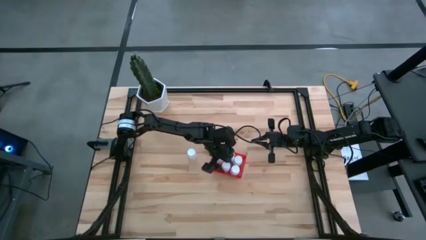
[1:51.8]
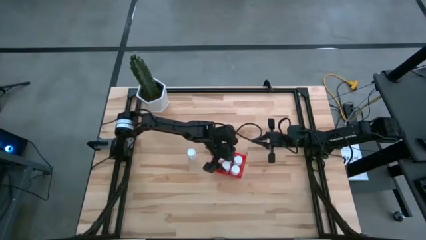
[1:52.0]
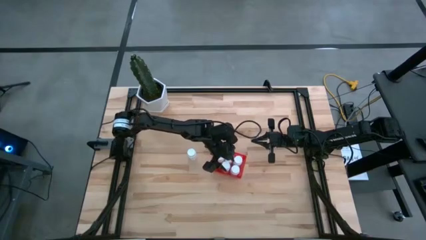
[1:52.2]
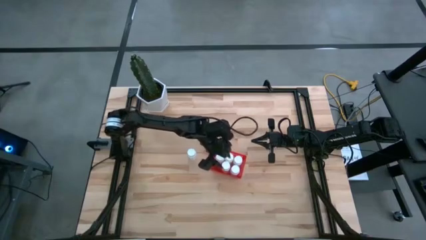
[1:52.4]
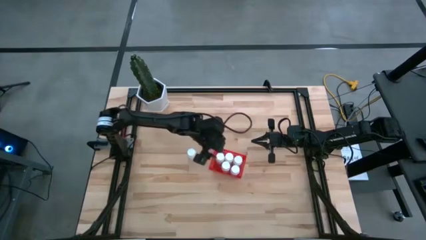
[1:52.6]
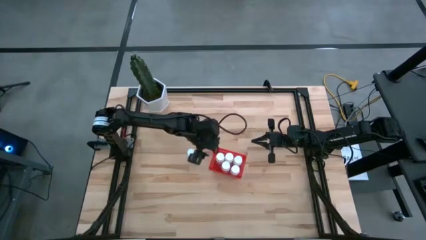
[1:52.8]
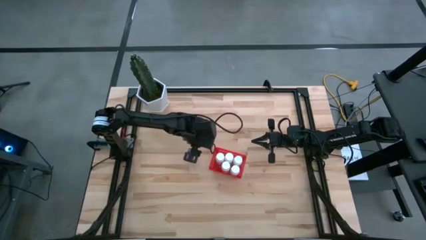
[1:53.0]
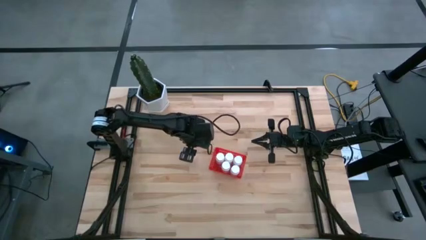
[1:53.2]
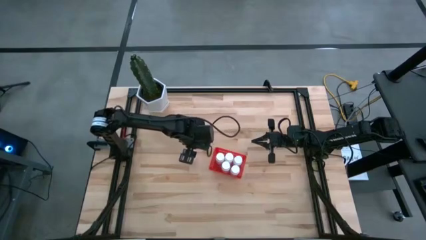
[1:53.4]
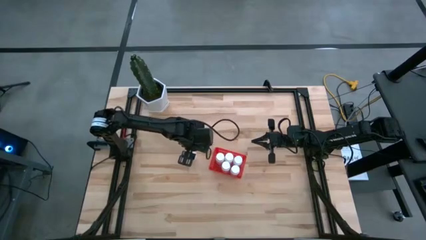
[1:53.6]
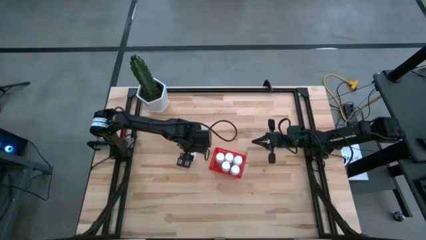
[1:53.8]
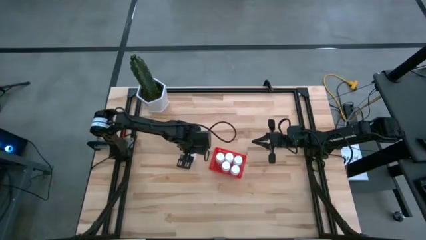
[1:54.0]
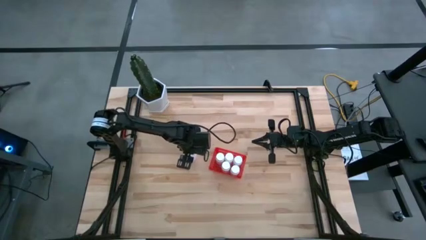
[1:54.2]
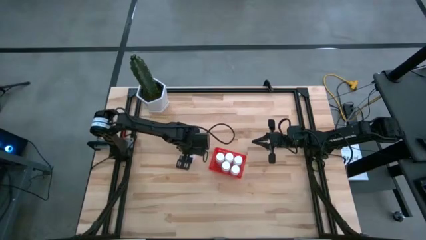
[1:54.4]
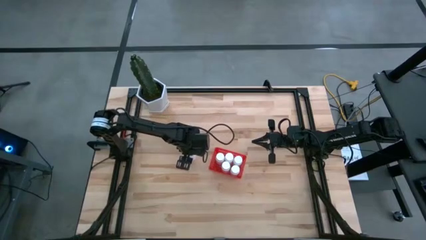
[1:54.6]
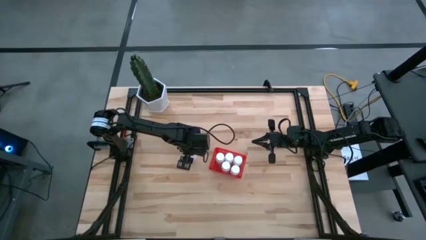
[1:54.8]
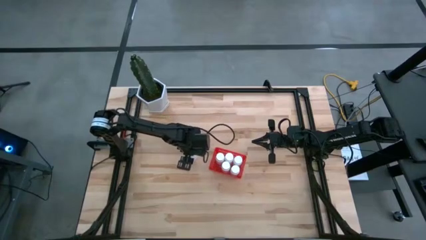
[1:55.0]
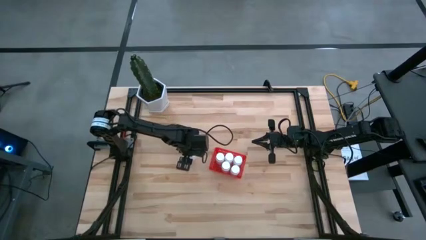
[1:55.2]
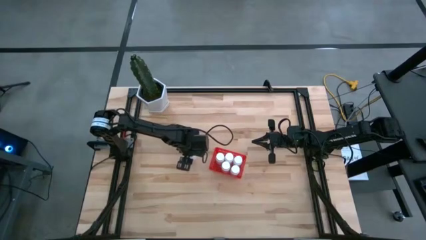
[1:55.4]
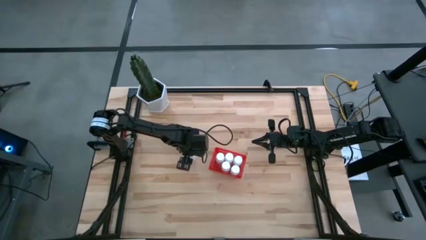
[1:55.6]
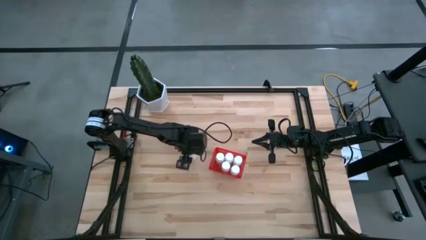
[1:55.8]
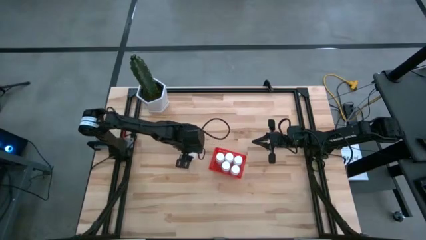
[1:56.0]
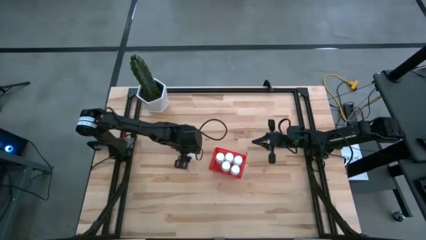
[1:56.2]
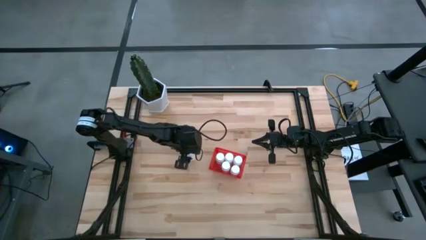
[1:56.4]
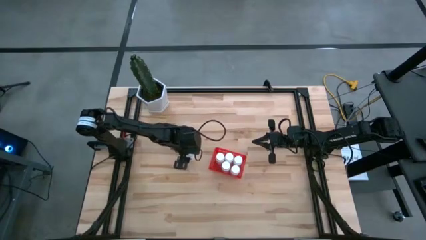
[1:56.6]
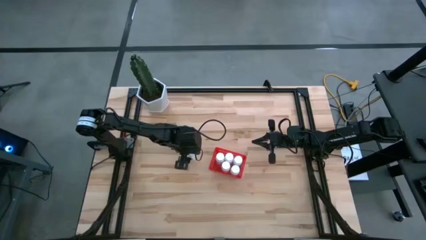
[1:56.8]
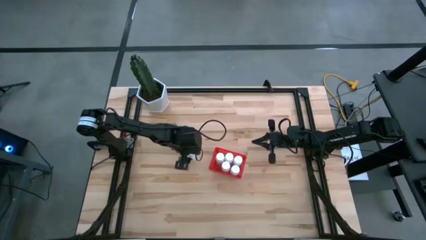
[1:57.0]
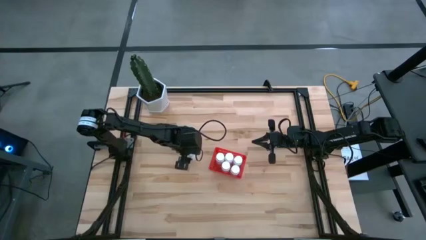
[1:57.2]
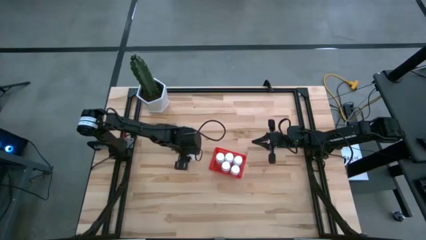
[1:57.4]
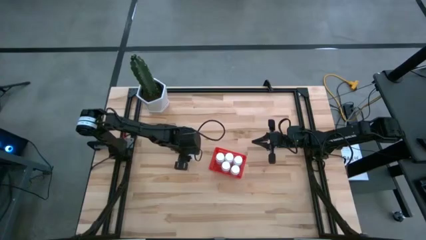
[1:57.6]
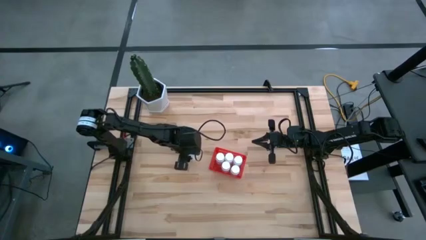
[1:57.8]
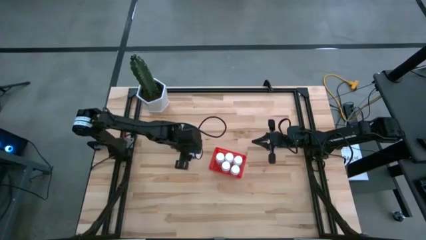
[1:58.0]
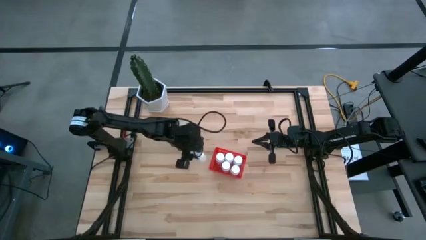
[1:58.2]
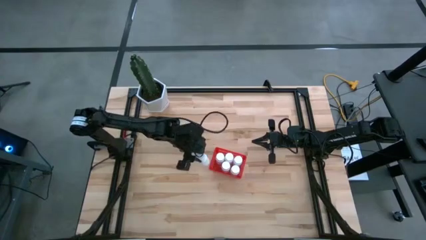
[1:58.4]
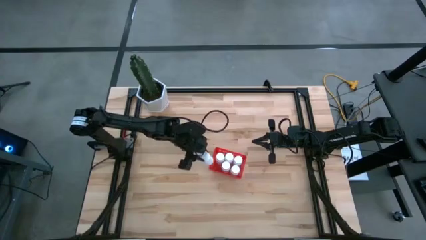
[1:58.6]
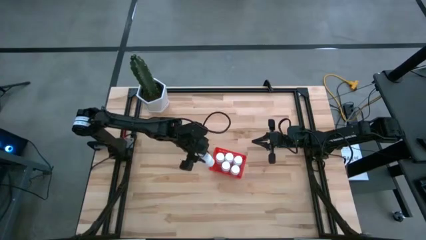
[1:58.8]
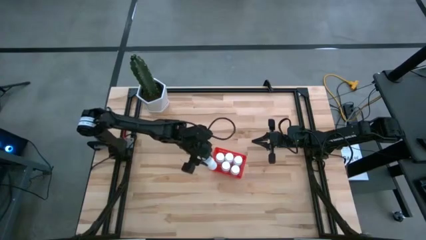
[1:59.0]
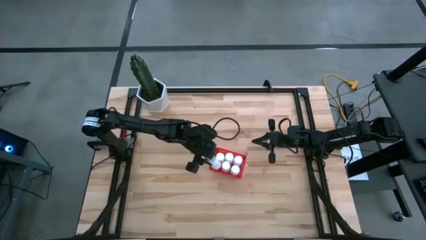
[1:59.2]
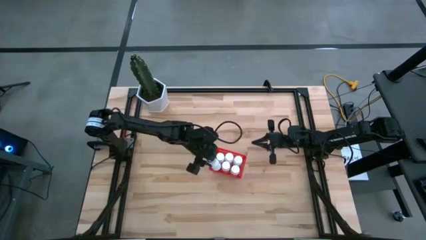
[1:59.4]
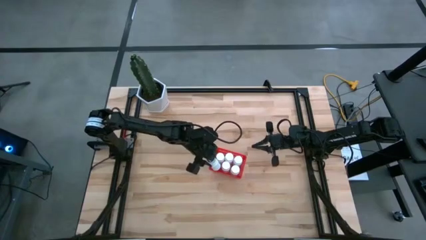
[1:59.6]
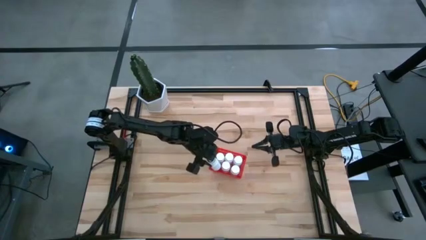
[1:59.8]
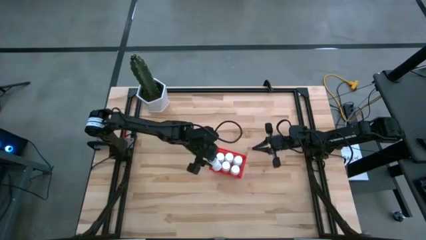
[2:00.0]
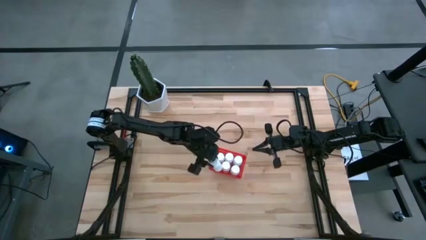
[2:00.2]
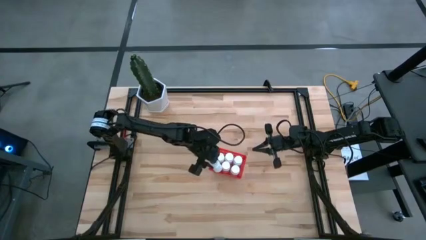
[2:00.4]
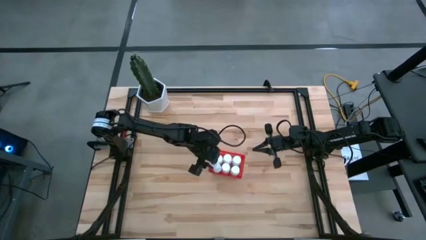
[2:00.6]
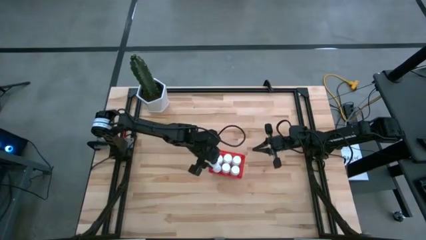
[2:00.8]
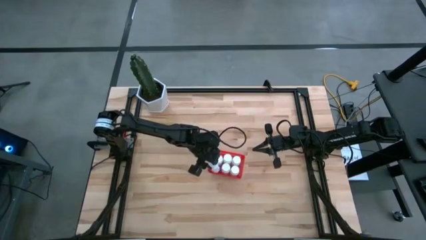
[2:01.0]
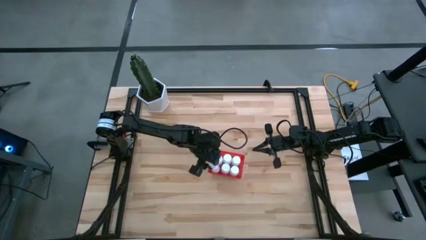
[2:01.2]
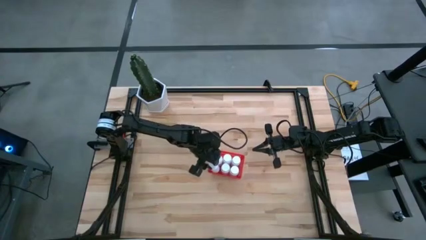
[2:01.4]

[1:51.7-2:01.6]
Task: Pick and place pill bottles into a basket
Put the white pill bottle into the red bin

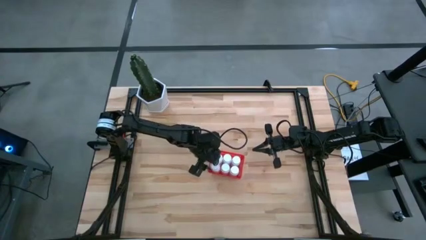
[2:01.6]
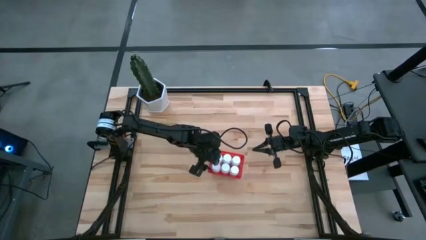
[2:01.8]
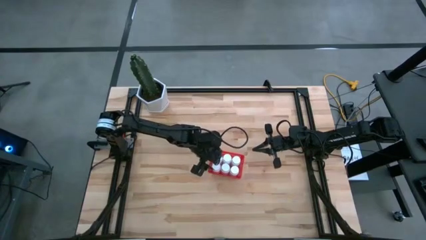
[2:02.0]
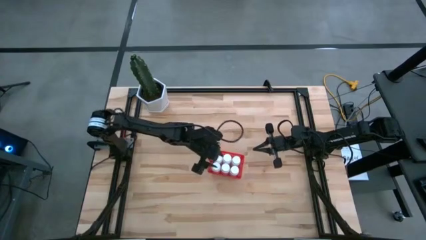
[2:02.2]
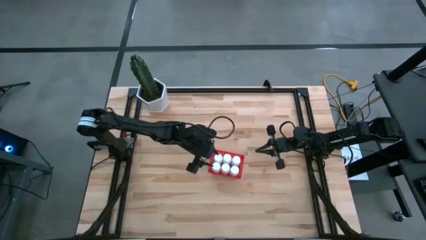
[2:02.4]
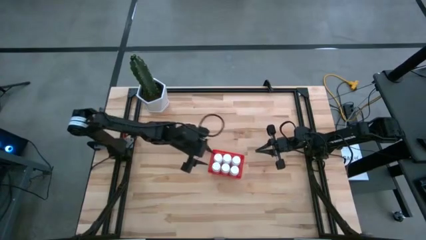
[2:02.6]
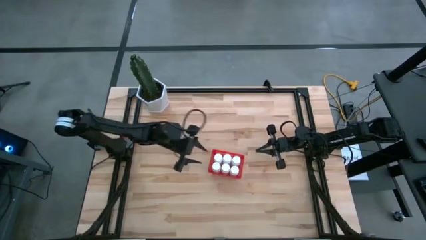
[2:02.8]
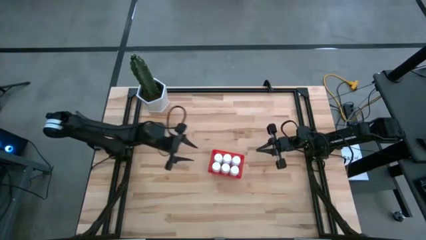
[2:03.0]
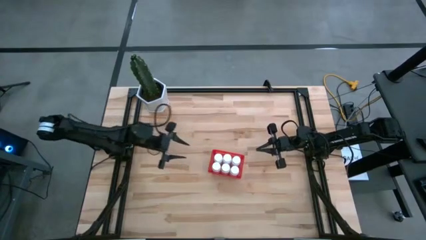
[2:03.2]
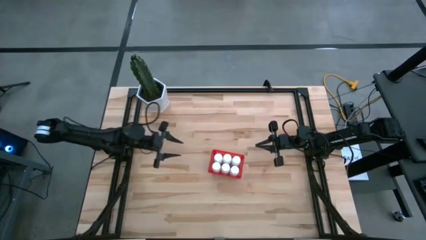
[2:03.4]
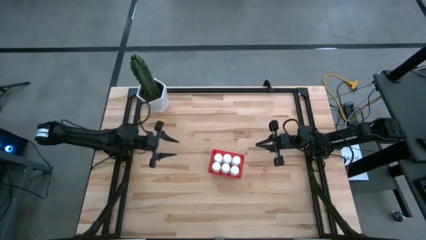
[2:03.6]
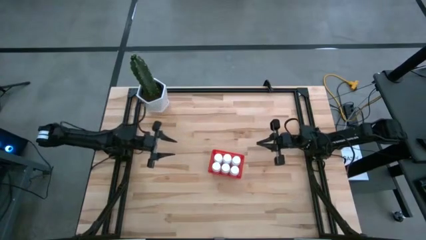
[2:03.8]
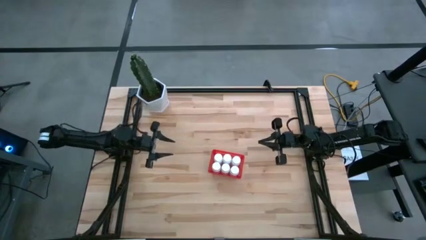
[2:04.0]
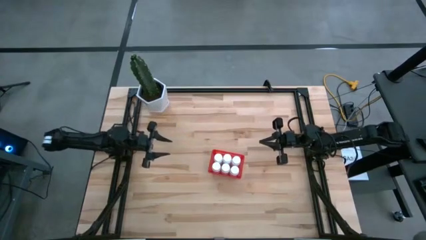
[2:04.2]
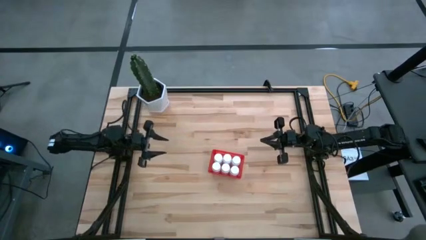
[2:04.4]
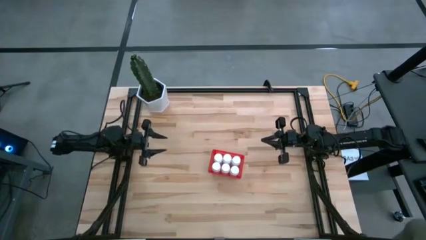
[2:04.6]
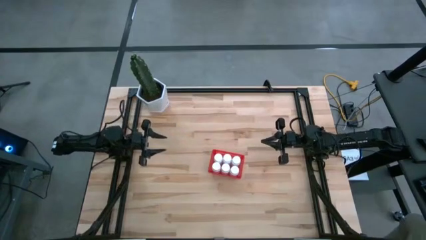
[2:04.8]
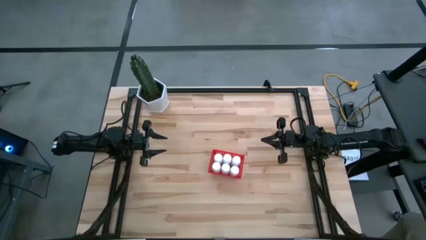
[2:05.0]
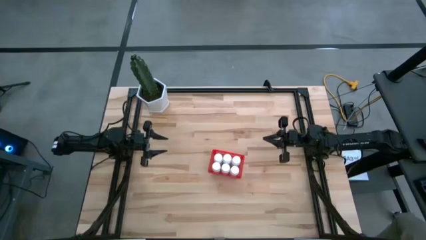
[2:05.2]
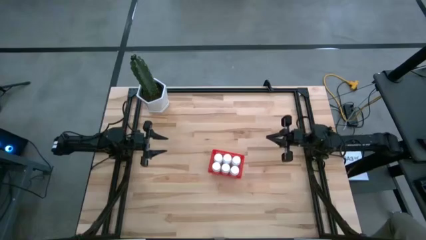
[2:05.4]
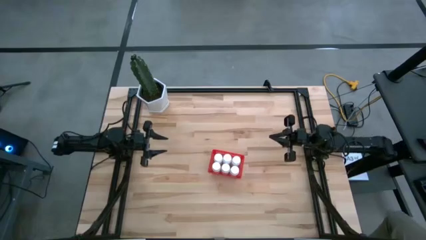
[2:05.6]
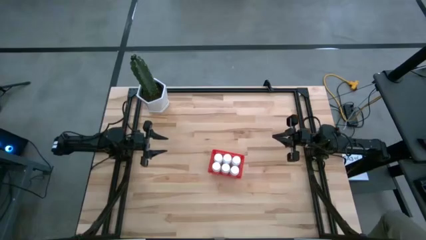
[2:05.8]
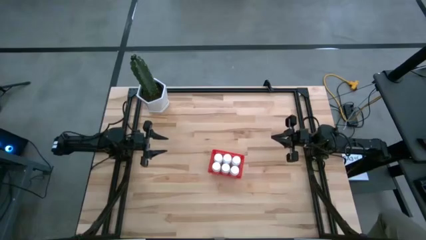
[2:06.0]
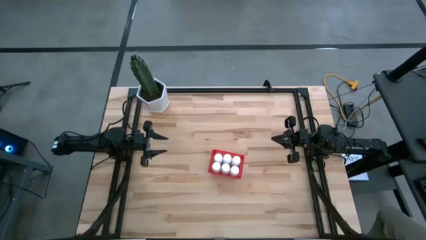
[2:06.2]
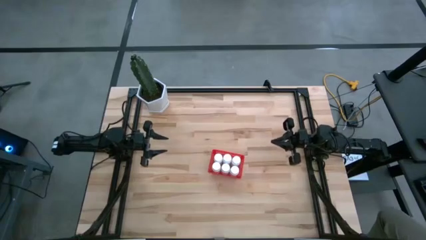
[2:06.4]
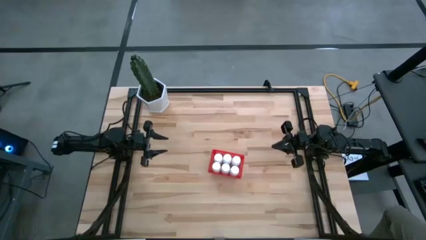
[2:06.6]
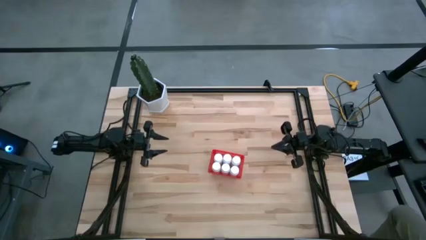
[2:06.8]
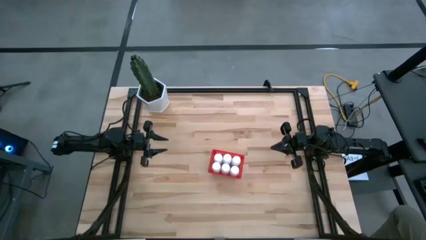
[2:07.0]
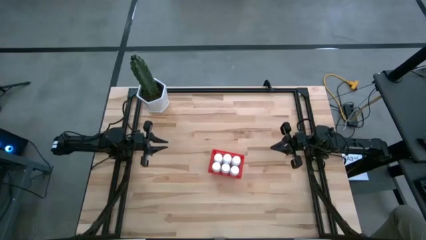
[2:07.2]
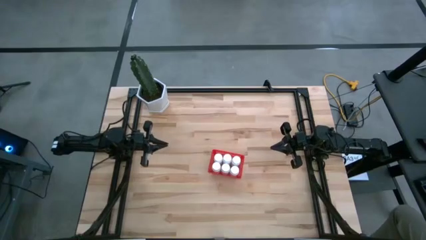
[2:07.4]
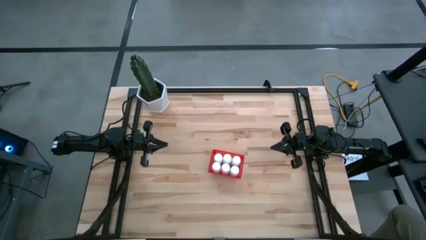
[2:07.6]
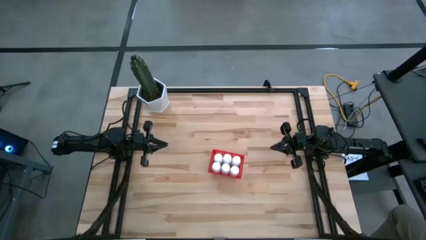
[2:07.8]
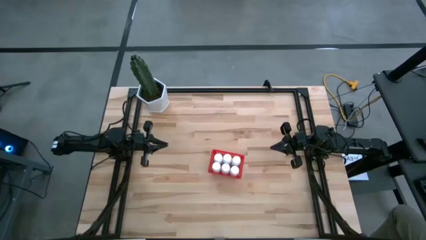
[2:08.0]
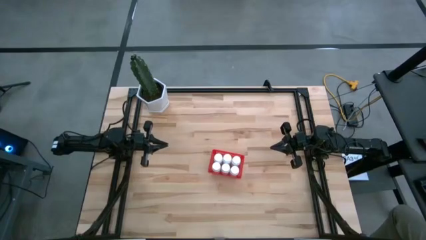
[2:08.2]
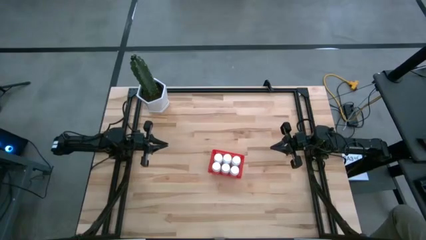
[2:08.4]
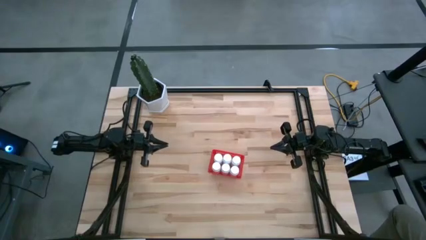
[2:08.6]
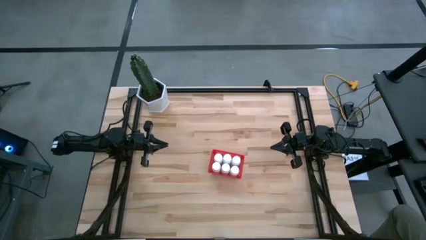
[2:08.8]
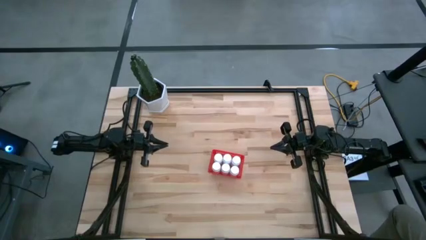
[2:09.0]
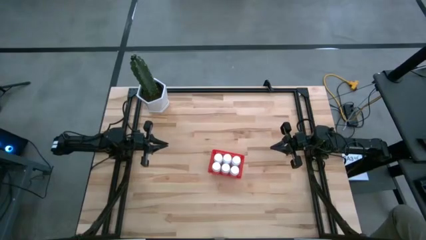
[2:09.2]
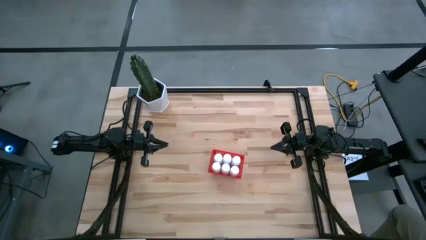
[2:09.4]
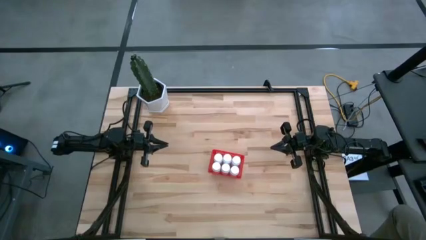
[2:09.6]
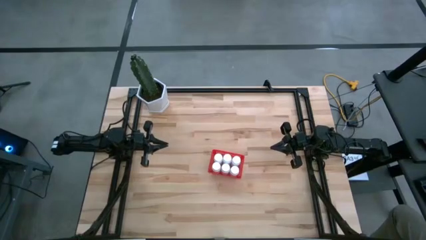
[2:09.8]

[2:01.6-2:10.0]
Return to Home Position
